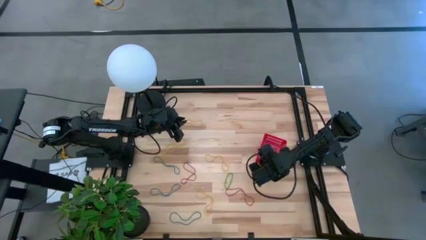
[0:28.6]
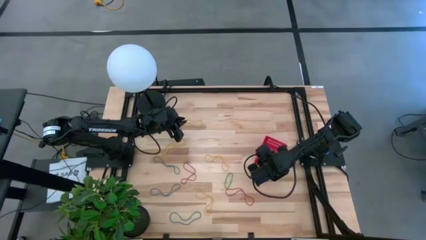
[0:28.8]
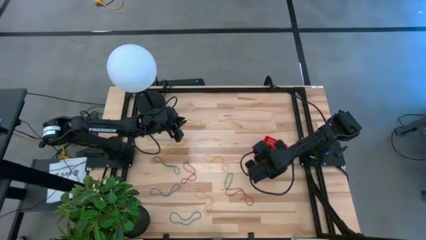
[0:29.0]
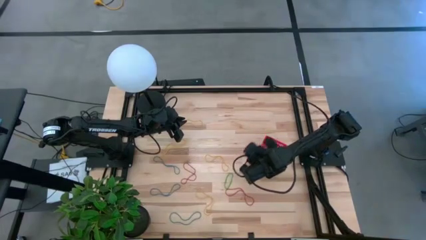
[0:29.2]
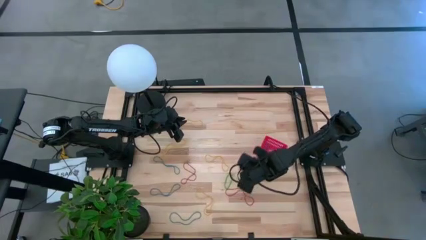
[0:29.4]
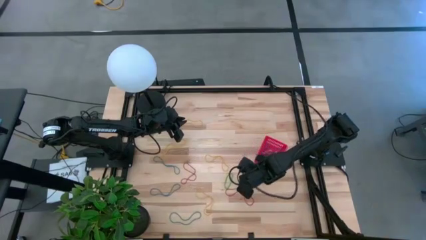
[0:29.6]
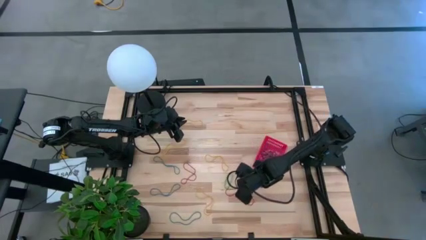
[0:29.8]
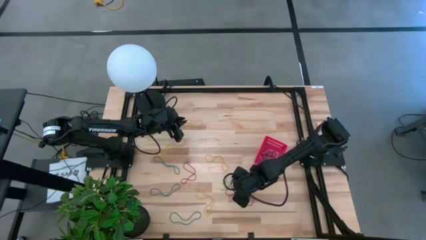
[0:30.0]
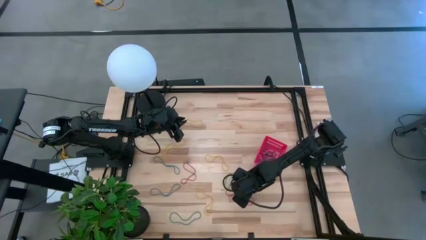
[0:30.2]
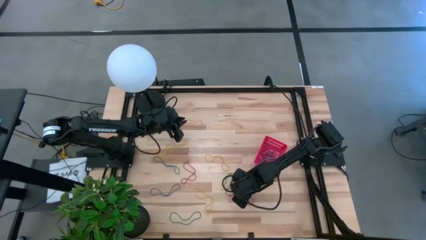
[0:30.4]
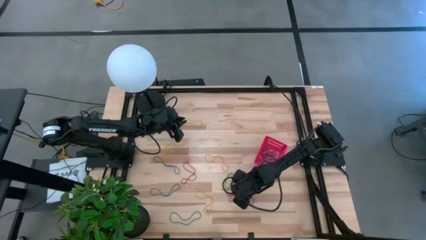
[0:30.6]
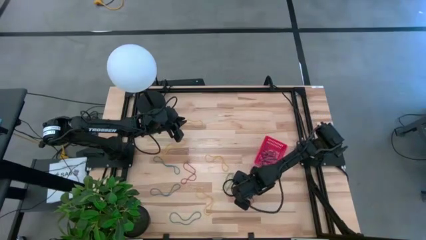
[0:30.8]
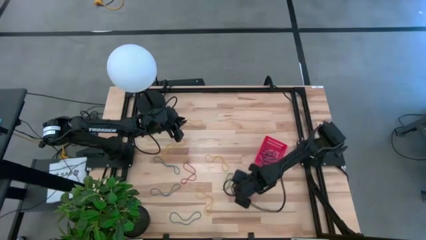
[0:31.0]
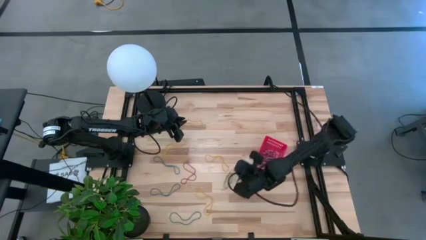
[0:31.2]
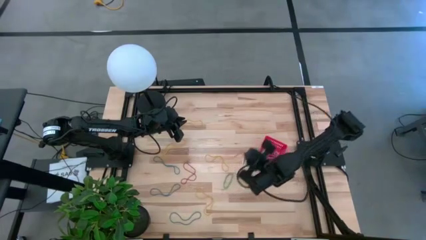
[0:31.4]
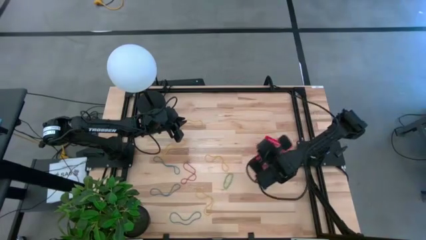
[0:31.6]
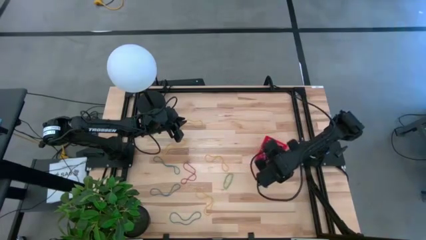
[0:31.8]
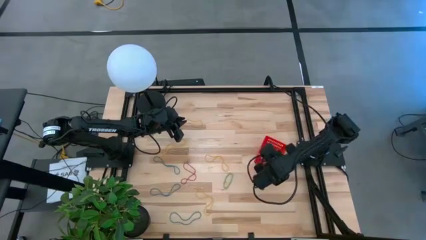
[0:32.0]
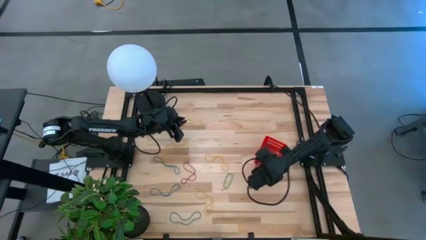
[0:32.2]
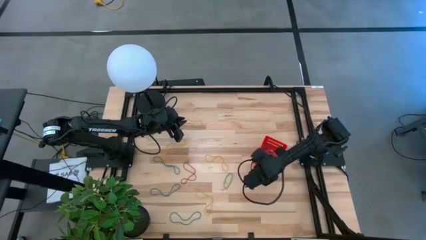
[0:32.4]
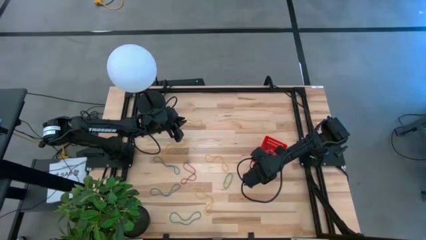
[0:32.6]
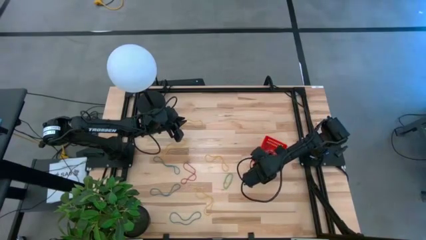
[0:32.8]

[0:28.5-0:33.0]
Task: Pick and place rubber bands into bin
Put the red rubber band into the basket

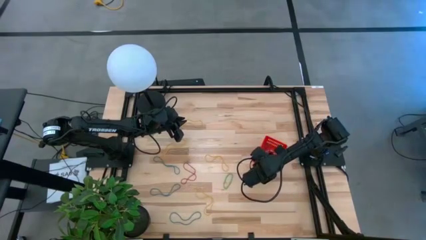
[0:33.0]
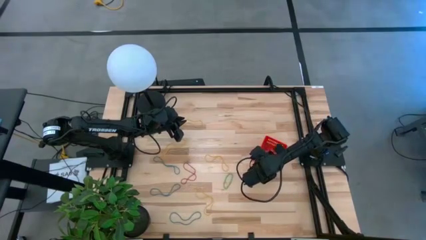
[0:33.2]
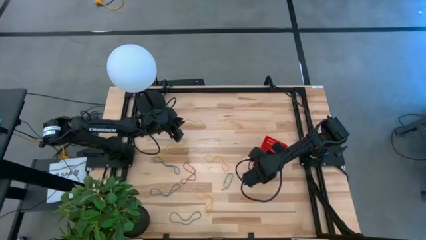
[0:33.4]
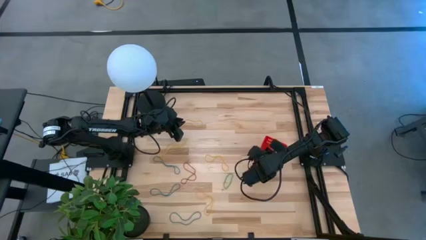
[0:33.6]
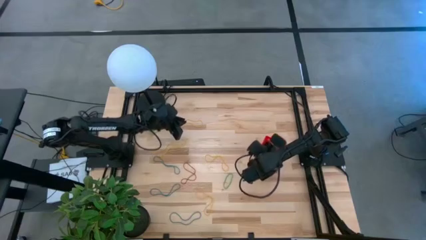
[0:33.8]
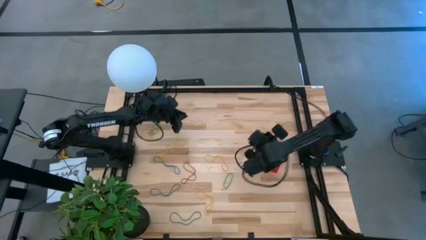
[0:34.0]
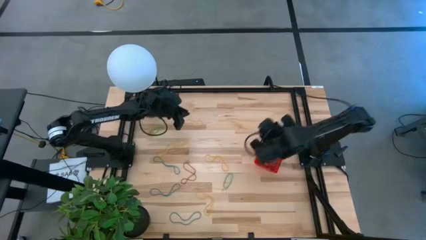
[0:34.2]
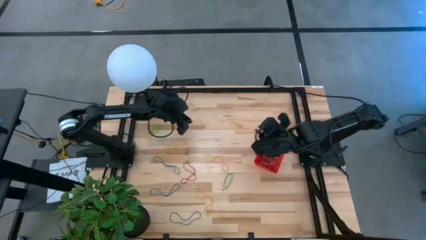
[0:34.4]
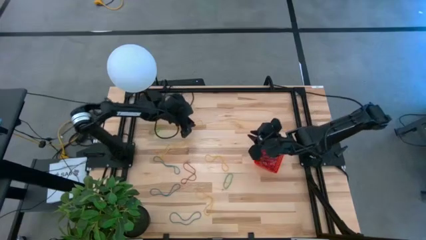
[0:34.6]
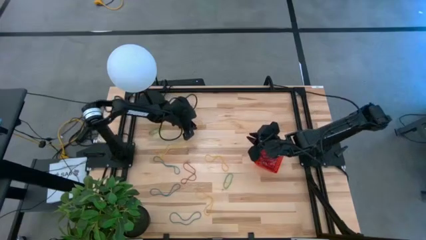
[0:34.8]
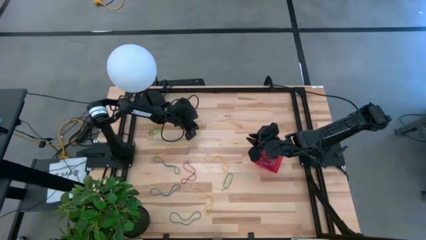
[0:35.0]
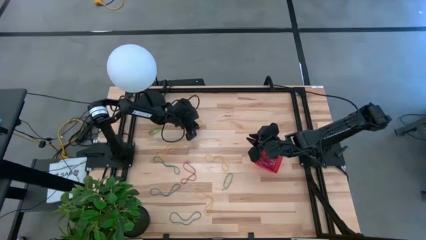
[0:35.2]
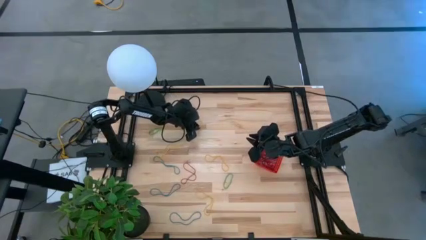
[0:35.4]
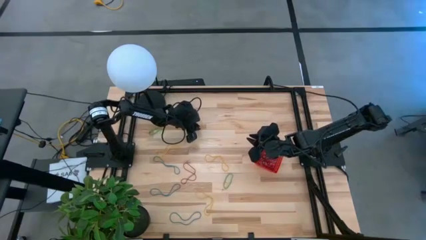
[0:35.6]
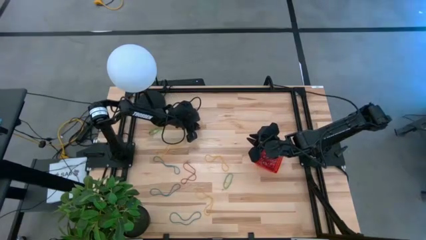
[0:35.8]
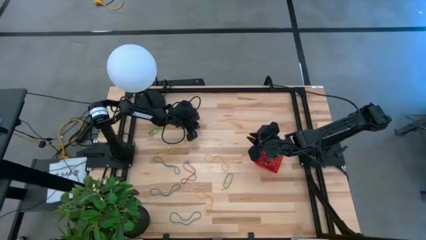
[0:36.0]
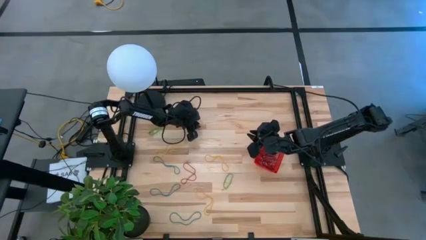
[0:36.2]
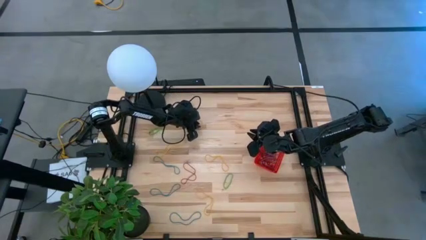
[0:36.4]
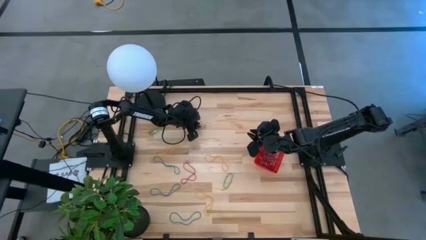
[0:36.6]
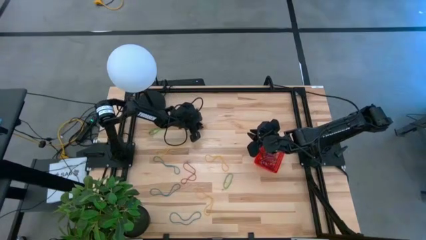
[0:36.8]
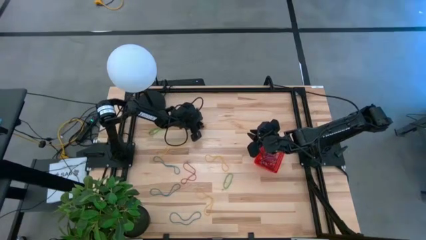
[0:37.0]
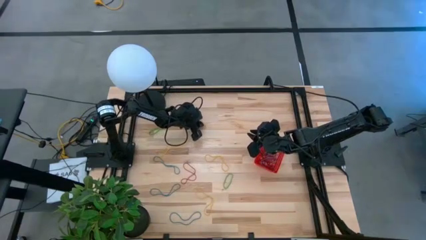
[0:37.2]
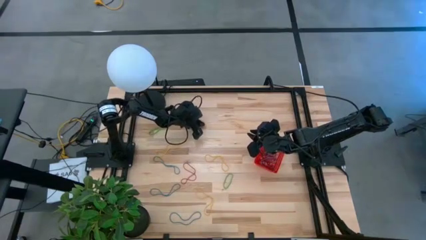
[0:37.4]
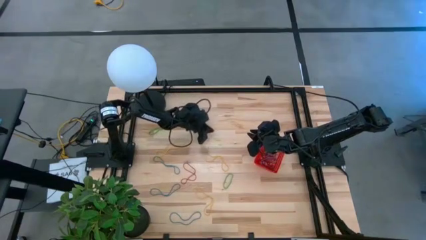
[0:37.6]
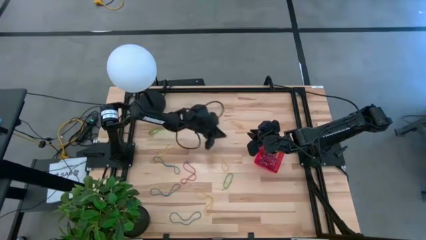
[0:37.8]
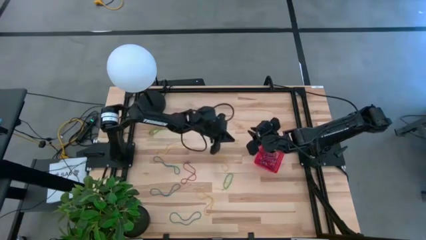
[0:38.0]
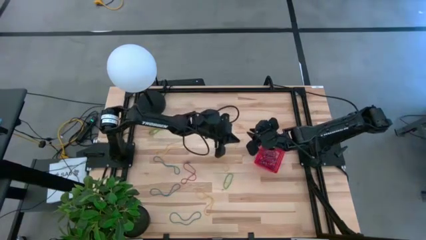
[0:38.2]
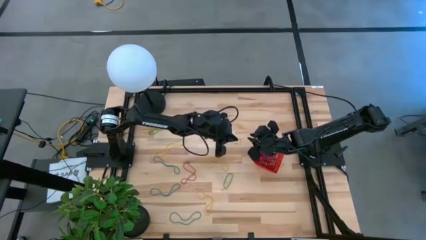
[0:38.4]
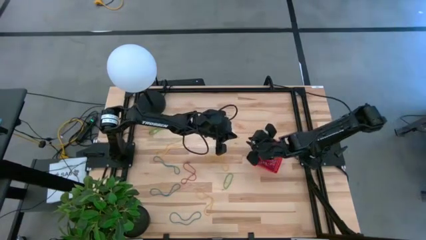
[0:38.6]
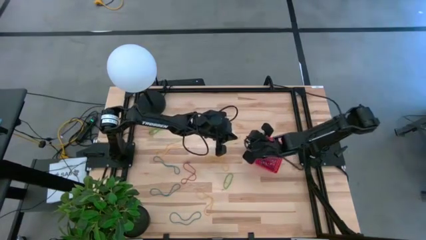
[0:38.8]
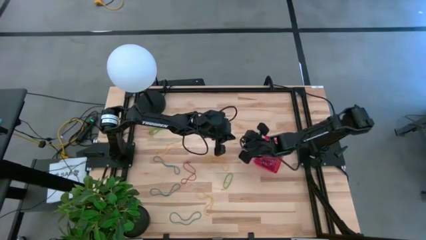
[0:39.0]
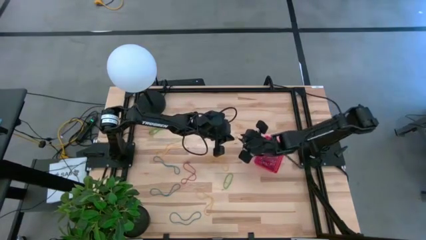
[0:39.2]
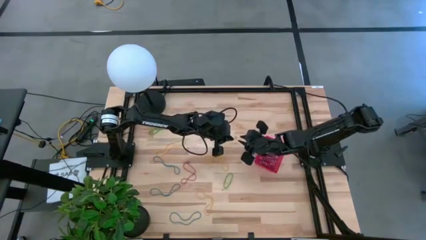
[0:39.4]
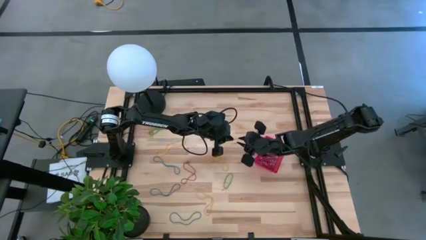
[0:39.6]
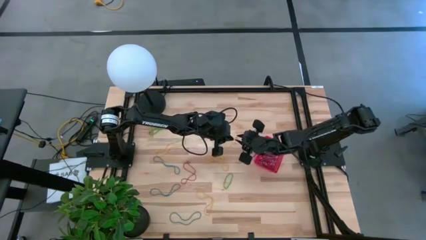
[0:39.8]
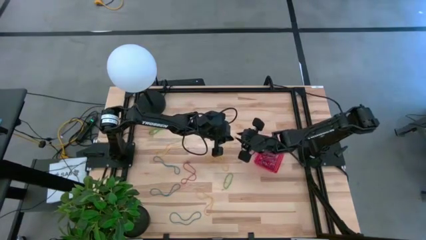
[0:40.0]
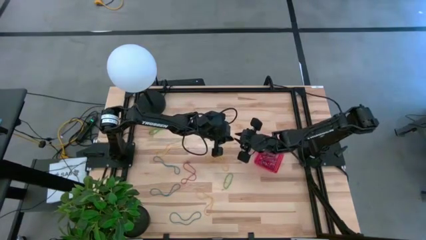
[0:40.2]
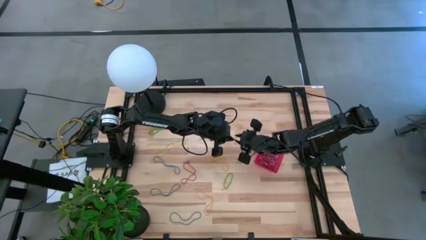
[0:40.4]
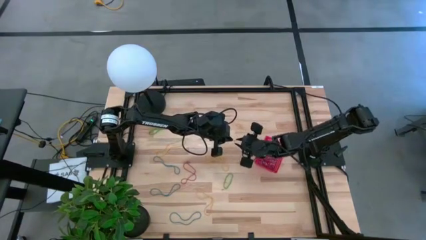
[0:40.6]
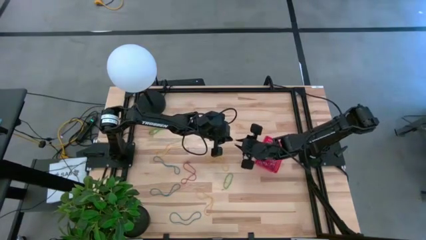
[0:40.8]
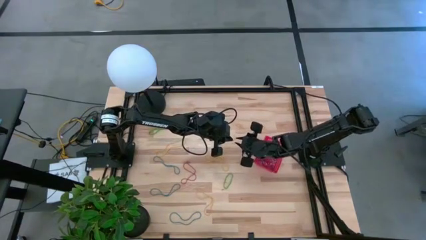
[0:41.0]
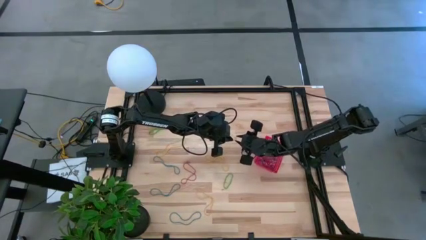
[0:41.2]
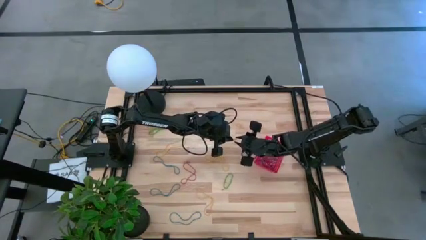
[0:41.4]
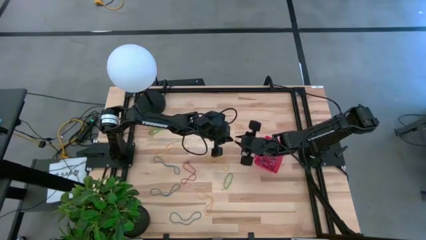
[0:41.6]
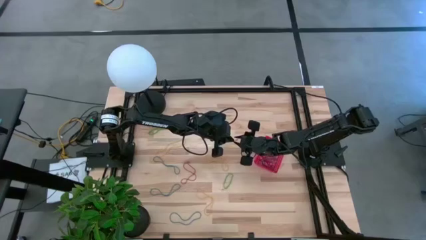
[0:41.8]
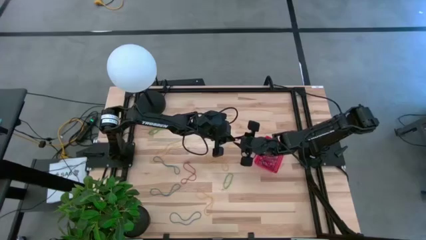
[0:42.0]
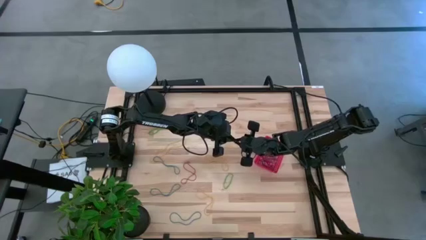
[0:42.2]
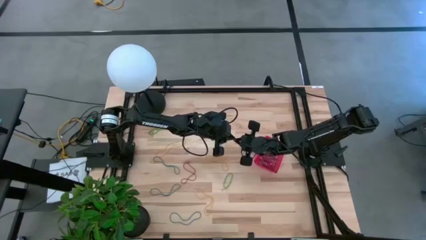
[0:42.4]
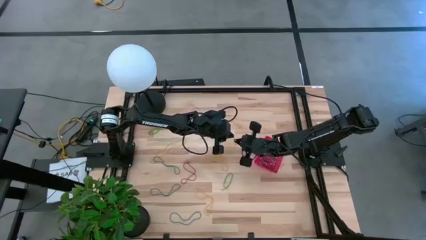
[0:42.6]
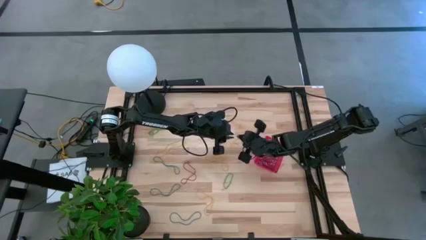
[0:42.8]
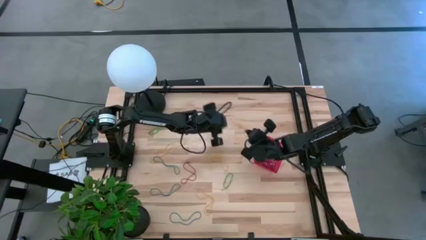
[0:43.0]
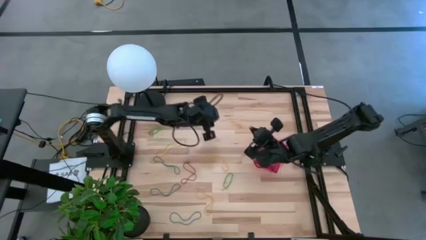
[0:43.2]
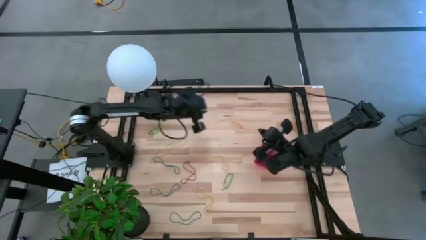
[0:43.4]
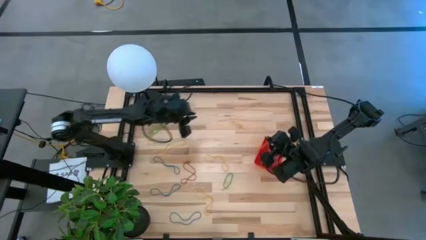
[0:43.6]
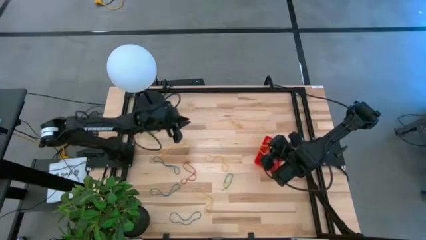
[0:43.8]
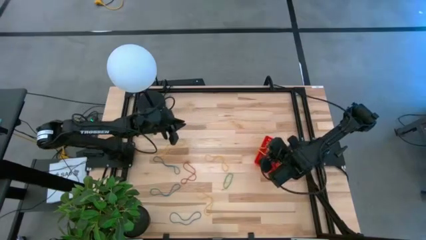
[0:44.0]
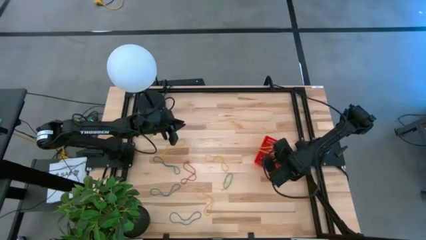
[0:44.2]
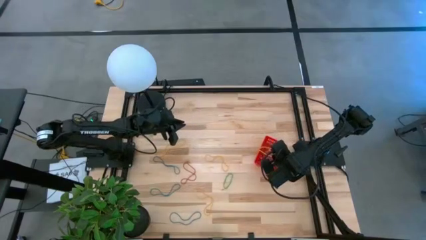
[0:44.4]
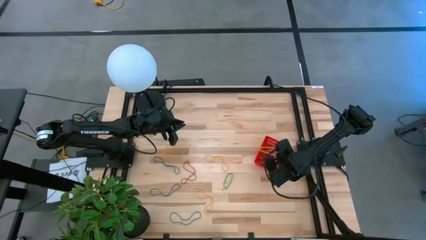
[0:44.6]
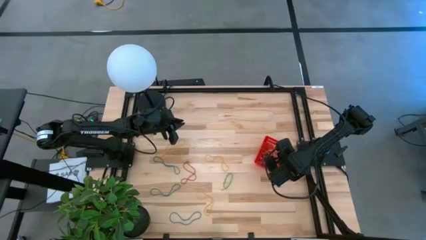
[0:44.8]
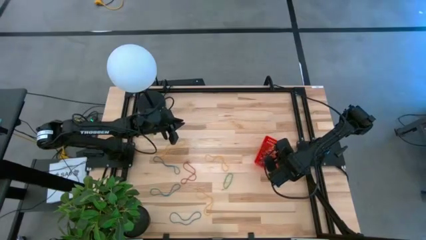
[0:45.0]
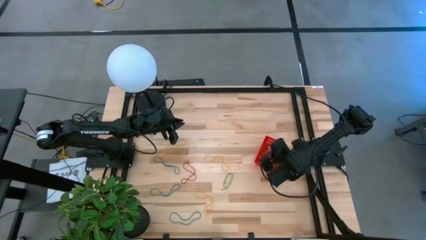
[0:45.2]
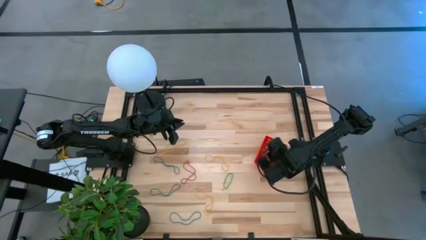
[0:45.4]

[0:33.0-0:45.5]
Put the yellow rubber band into the basket
